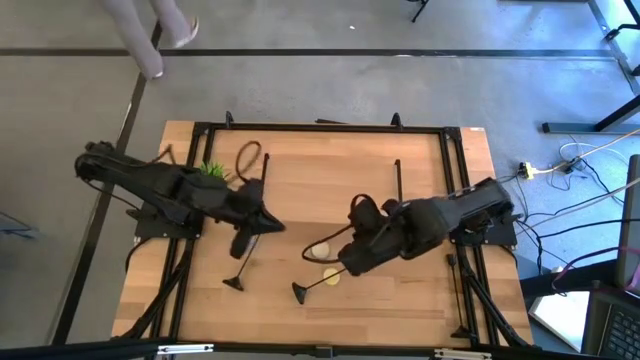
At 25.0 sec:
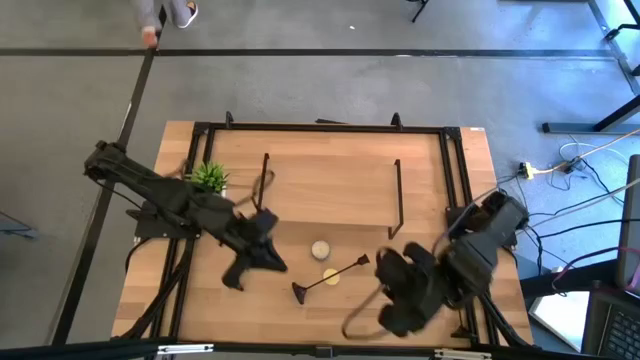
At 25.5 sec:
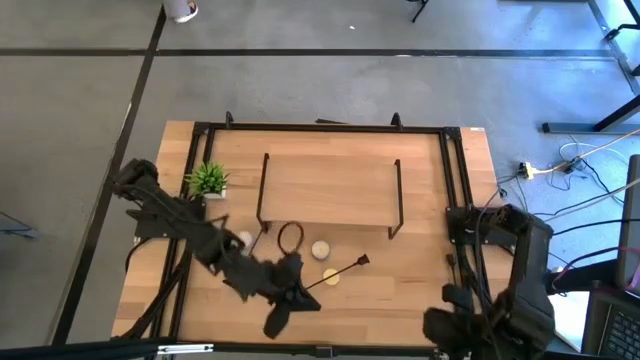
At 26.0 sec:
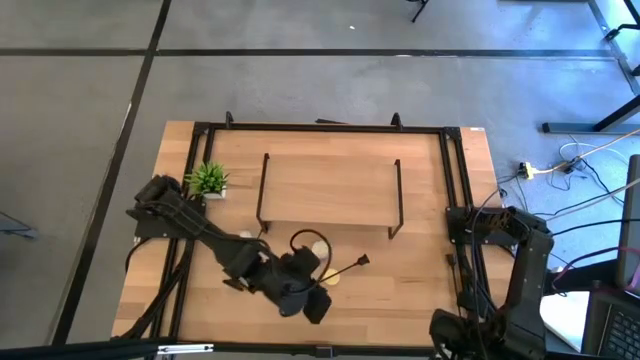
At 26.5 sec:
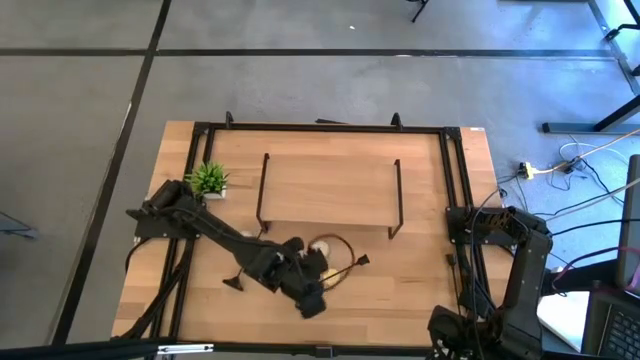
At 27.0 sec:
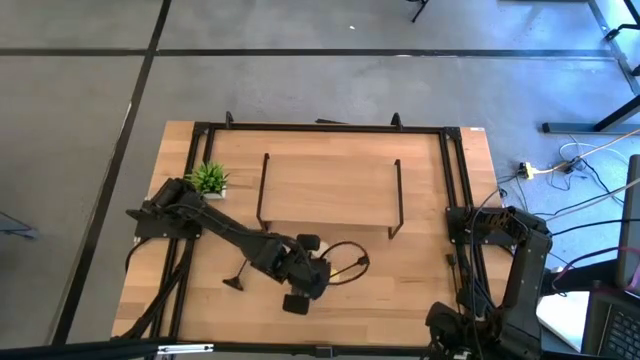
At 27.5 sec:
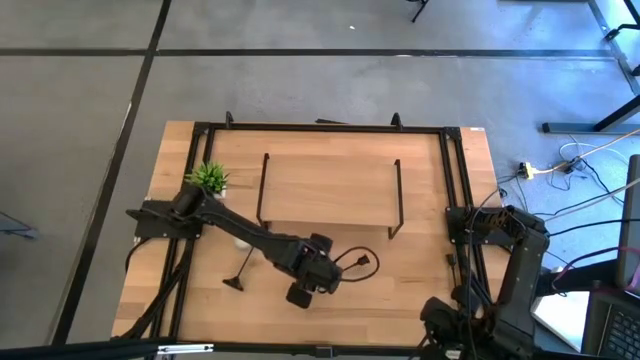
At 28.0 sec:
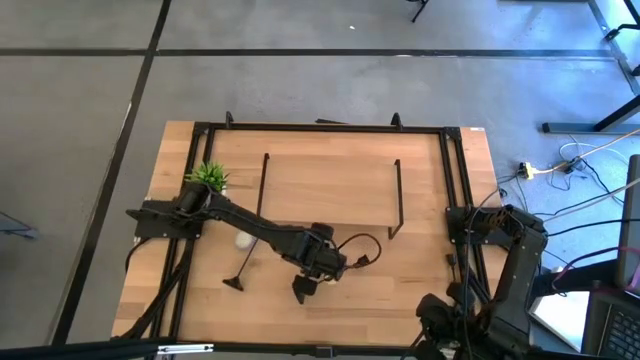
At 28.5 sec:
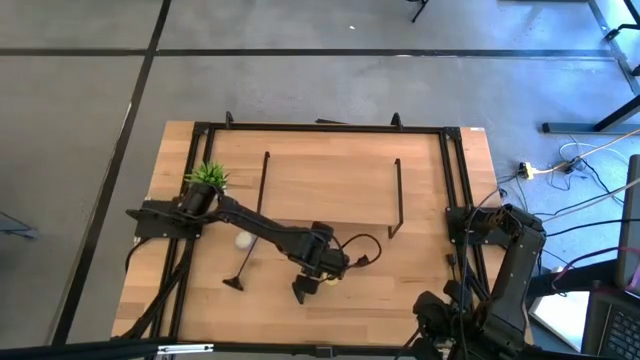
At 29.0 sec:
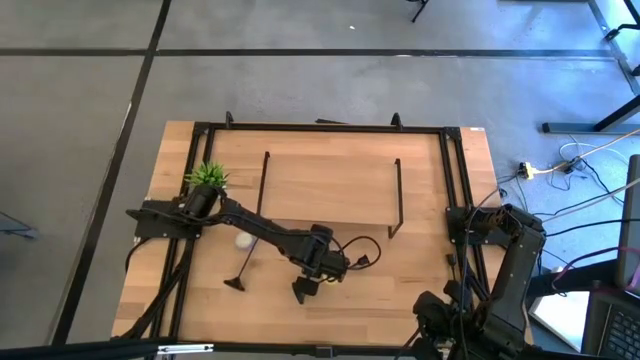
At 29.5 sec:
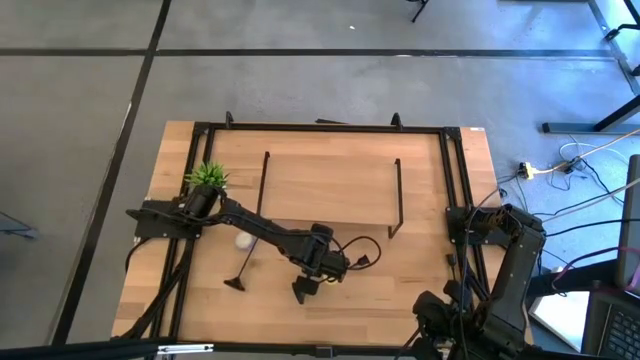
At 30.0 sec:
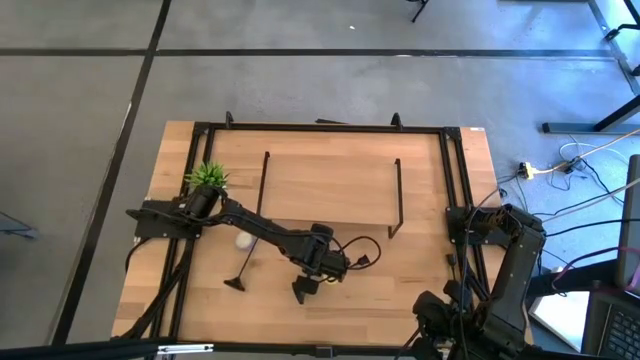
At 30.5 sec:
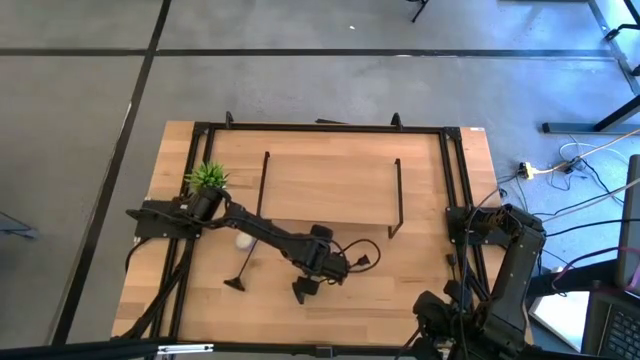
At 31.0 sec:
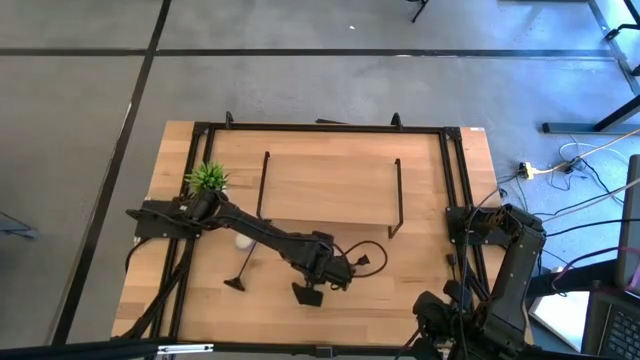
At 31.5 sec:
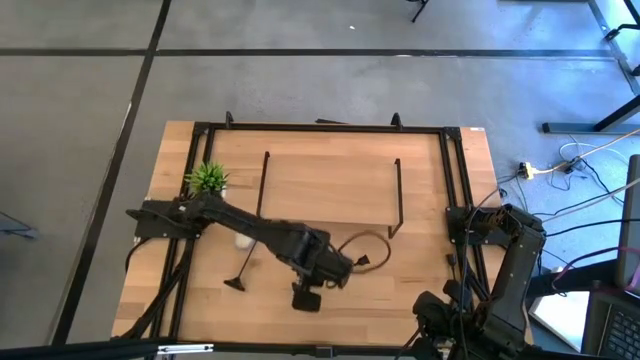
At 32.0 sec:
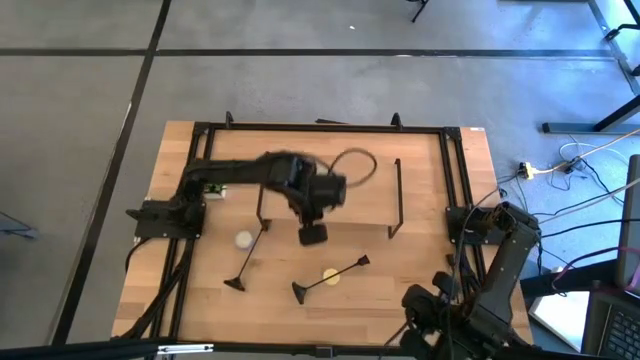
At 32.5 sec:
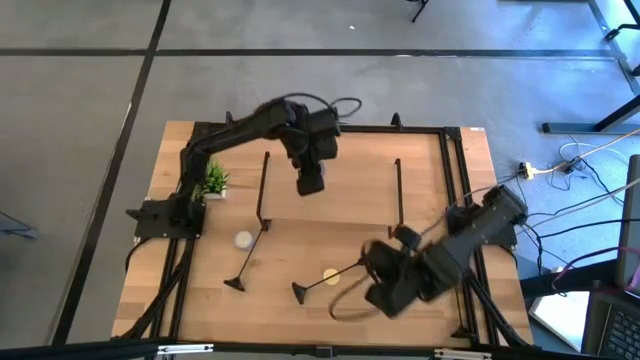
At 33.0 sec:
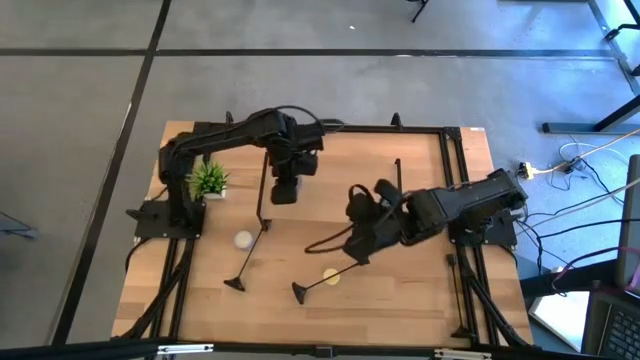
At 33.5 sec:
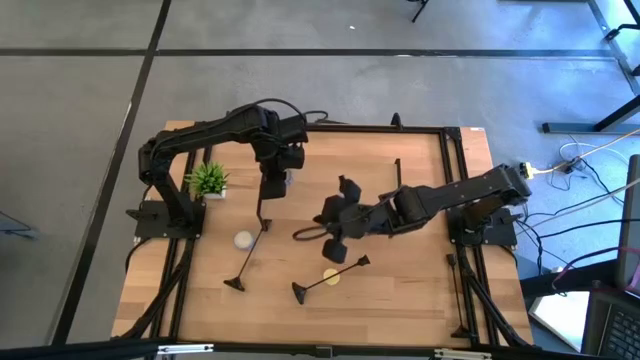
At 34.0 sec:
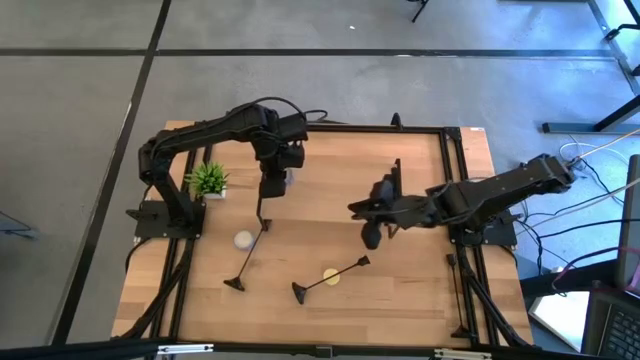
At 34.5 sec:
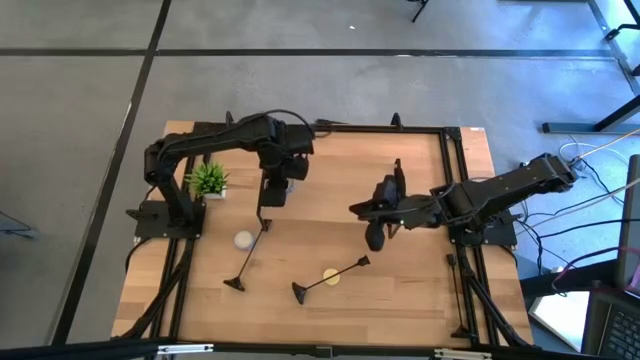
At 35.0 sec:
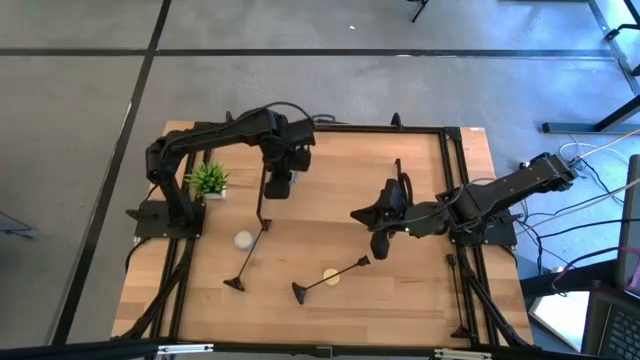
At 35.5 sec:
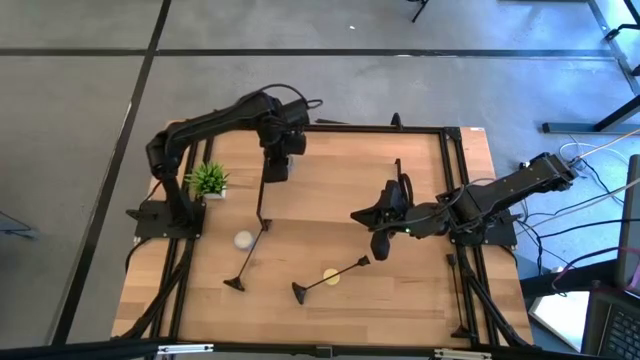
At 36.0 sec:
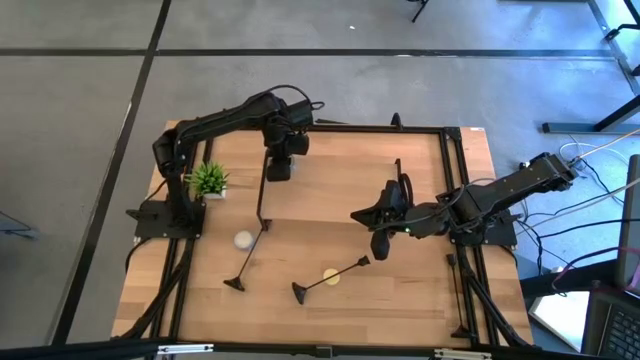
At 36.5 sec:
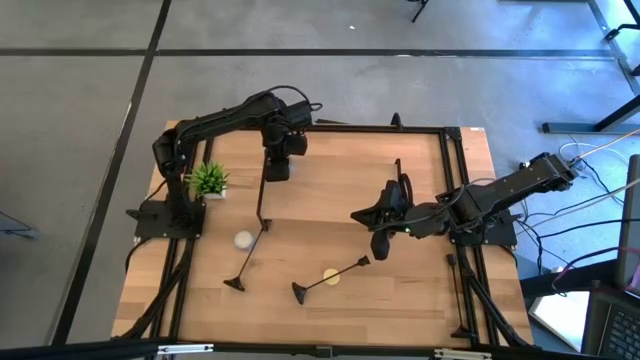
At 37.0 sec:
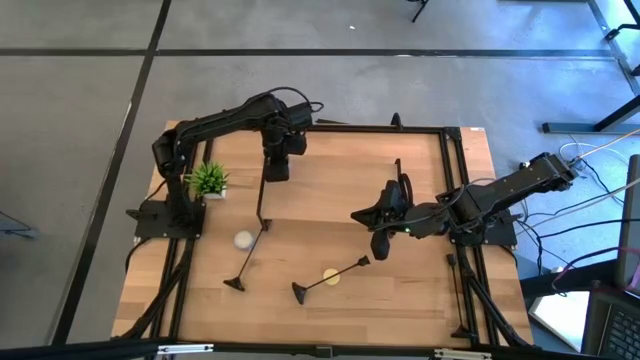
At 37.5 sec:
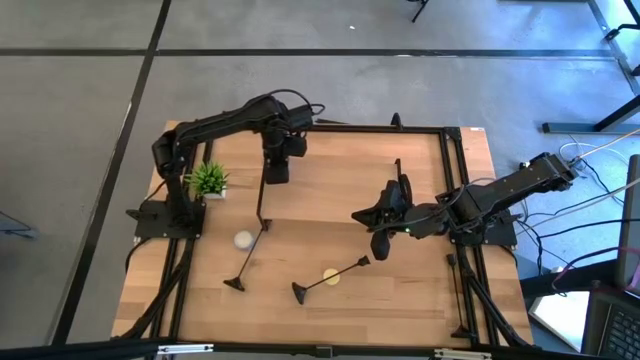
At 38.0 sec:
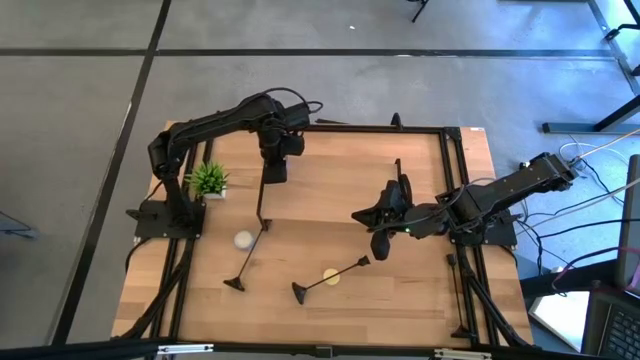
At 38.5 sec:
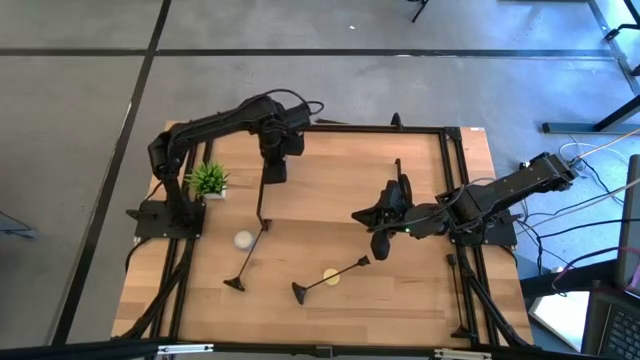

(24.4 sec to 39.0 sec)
Task: Pick & Place candle stick holders
Put the right blue scented candle on the shelf
